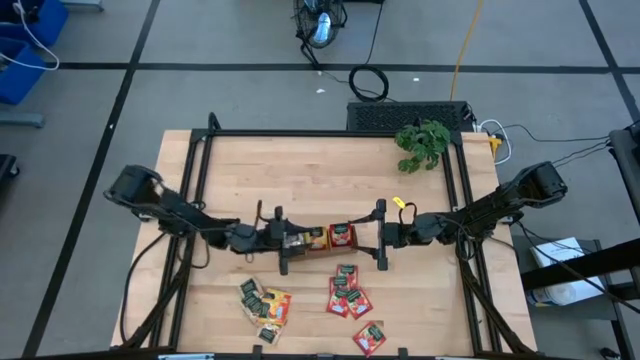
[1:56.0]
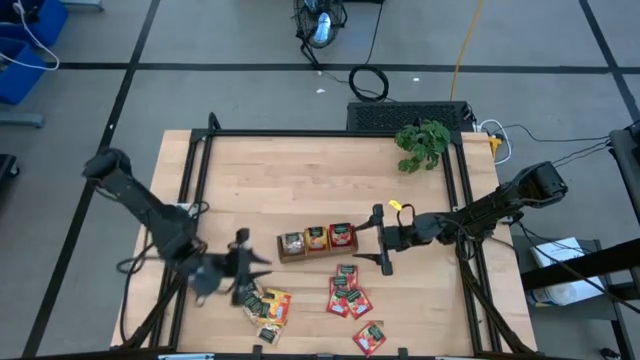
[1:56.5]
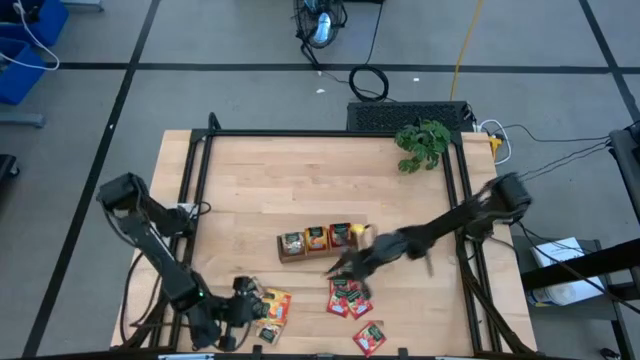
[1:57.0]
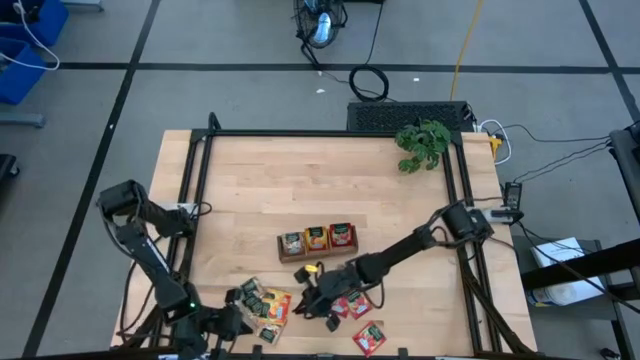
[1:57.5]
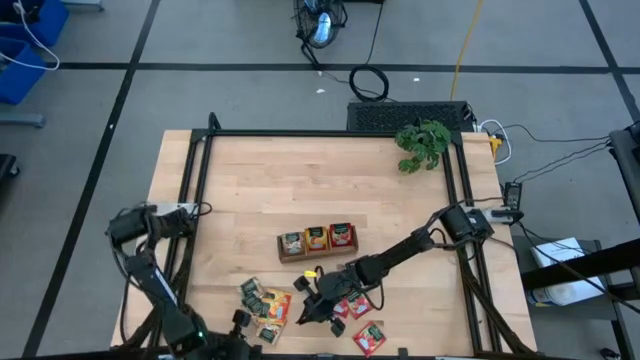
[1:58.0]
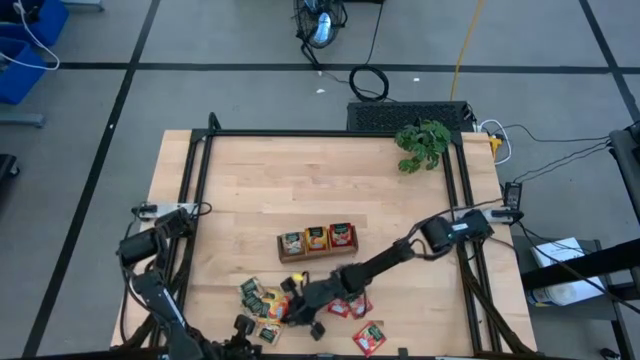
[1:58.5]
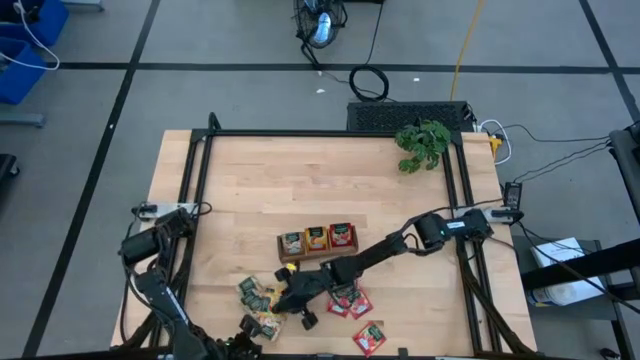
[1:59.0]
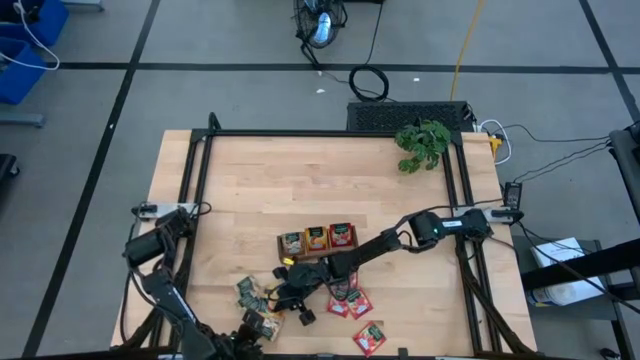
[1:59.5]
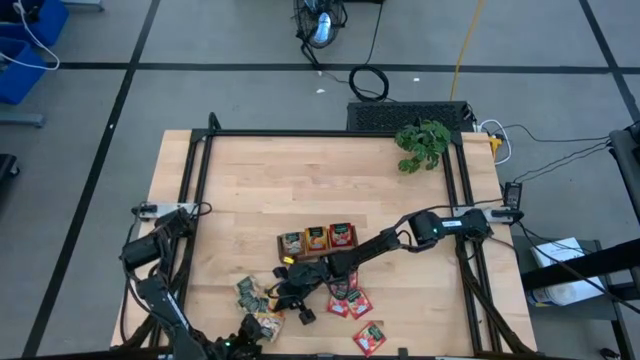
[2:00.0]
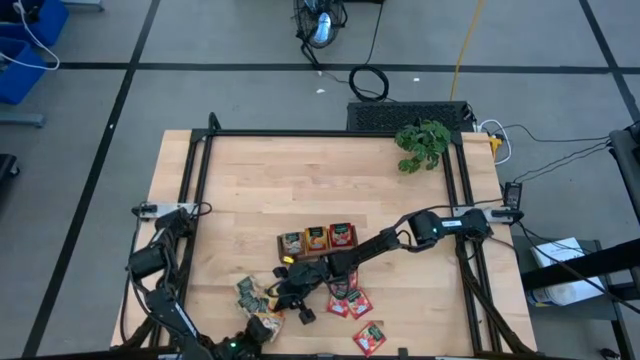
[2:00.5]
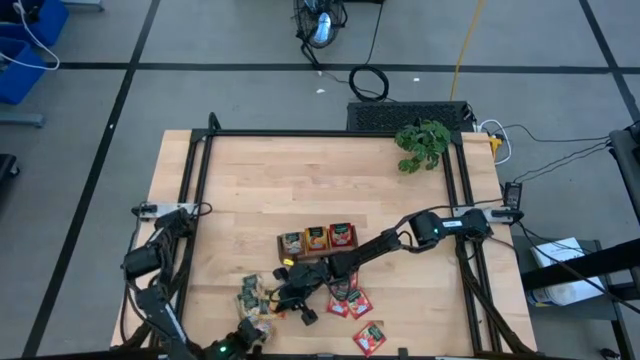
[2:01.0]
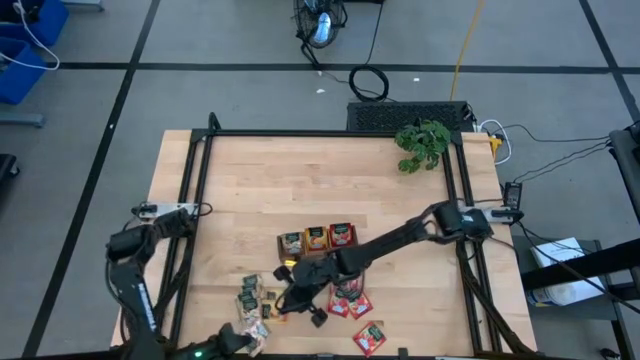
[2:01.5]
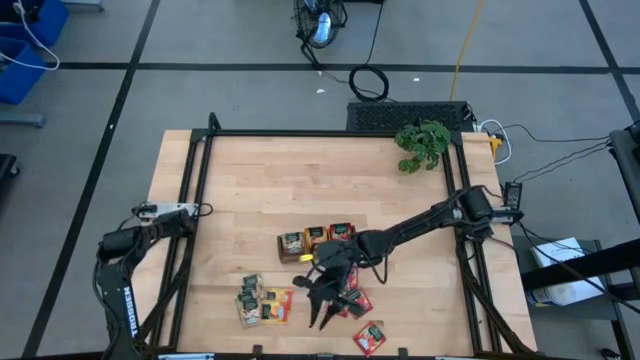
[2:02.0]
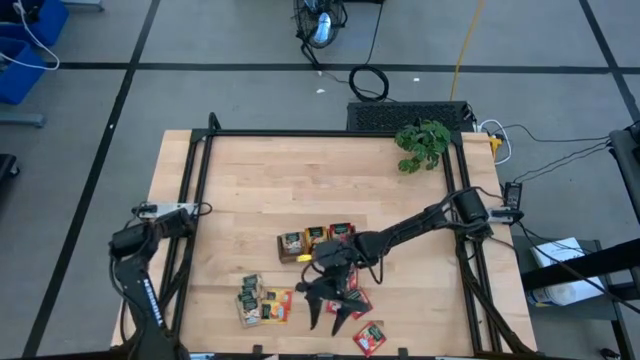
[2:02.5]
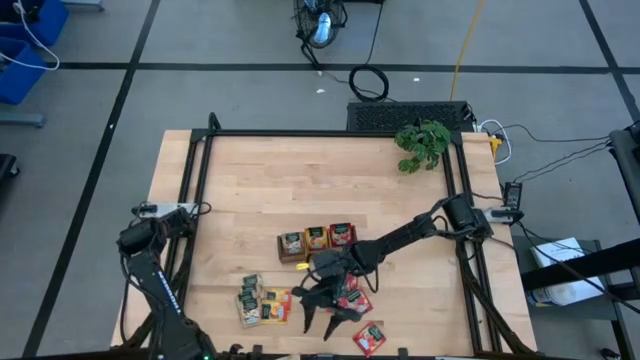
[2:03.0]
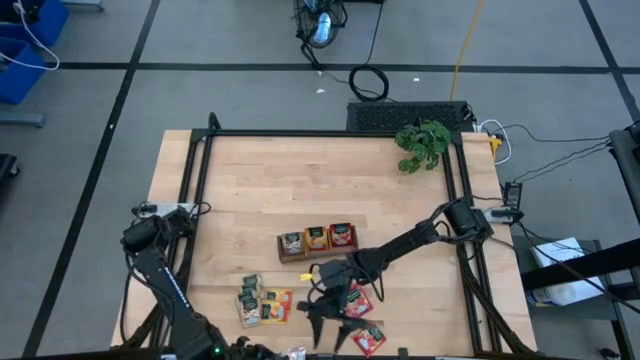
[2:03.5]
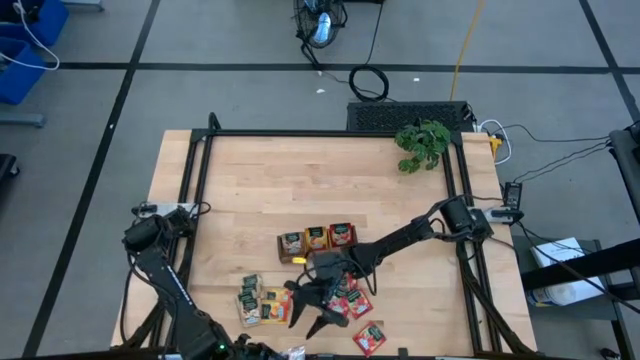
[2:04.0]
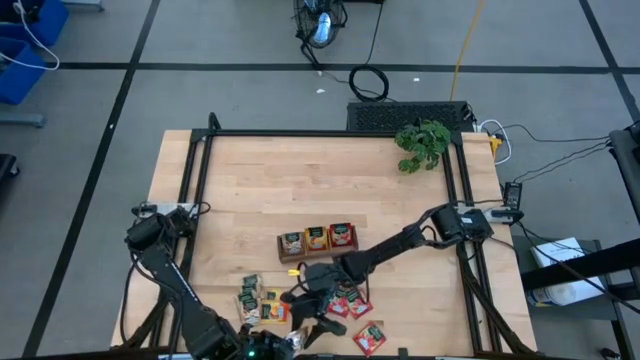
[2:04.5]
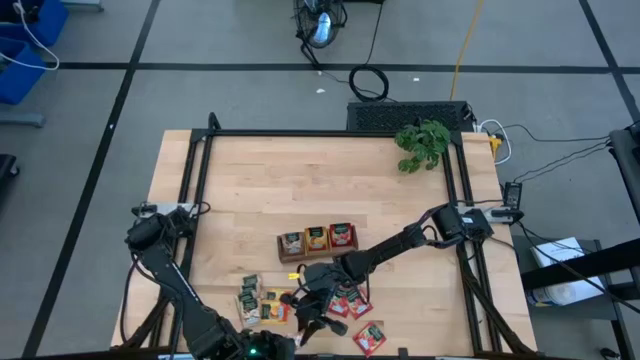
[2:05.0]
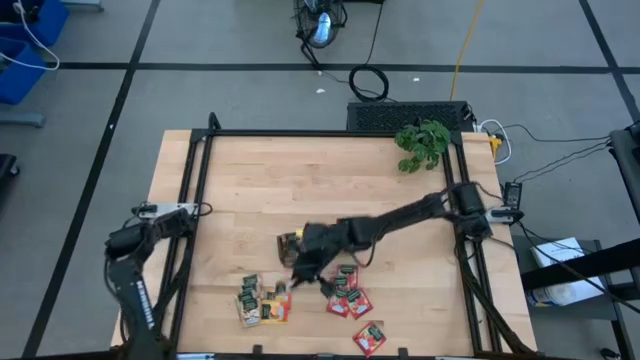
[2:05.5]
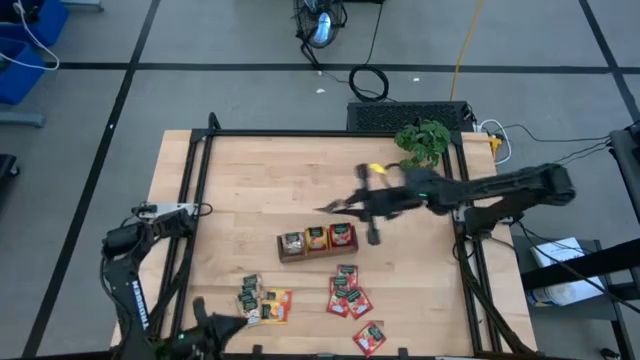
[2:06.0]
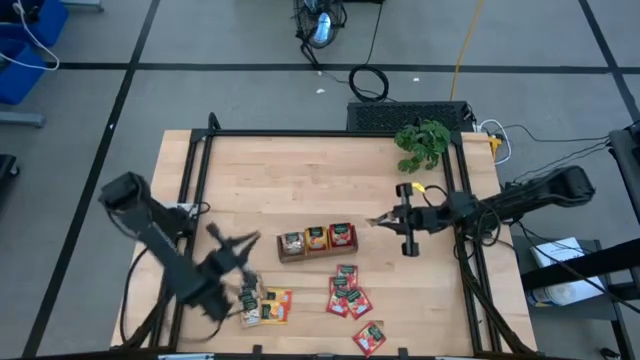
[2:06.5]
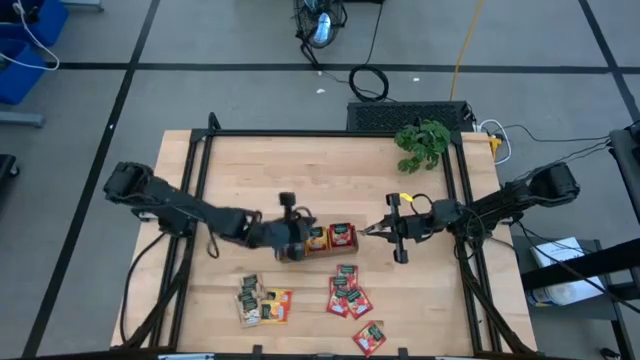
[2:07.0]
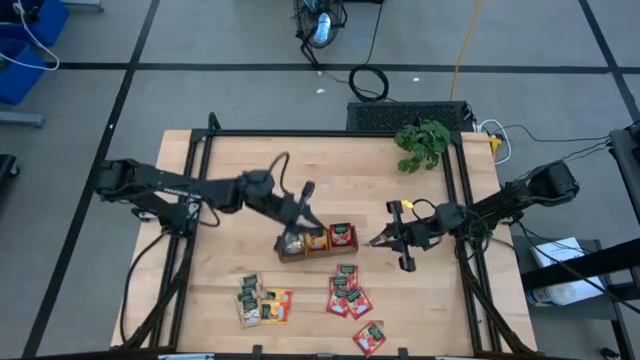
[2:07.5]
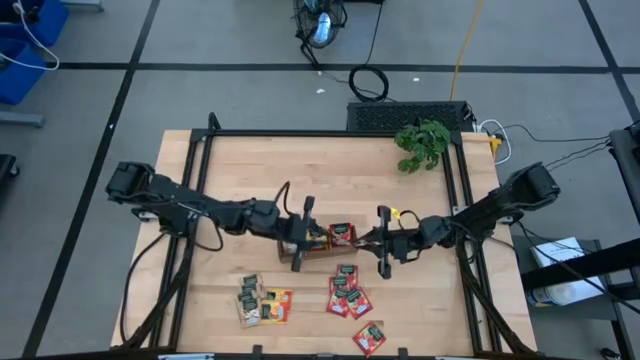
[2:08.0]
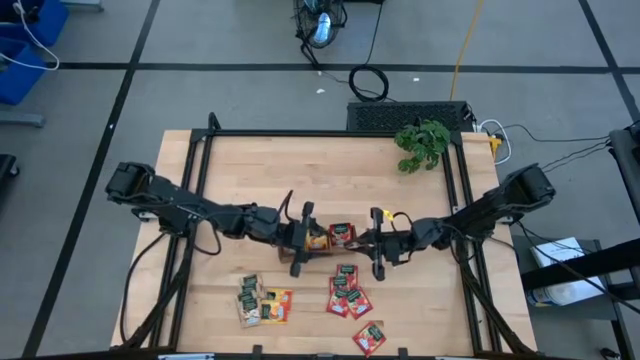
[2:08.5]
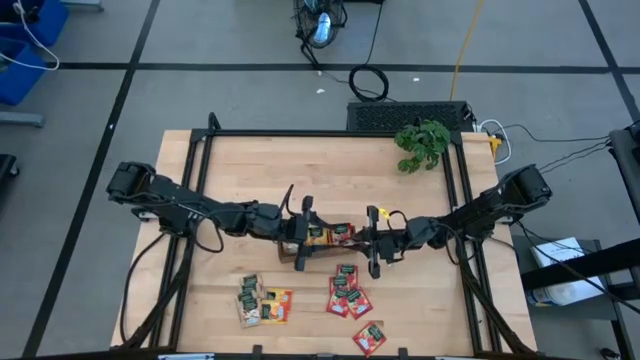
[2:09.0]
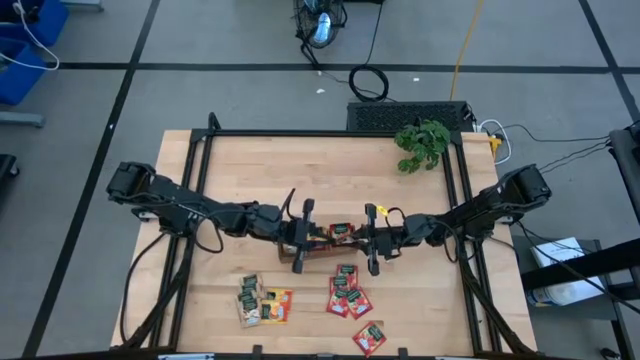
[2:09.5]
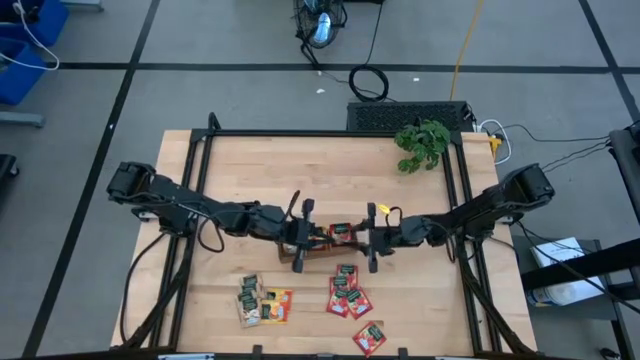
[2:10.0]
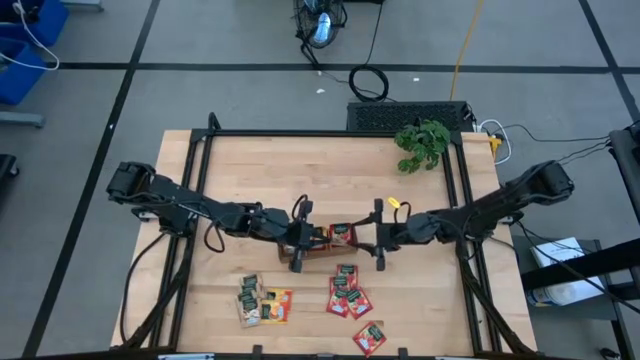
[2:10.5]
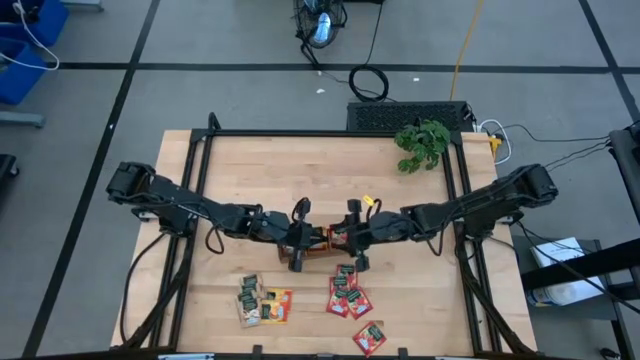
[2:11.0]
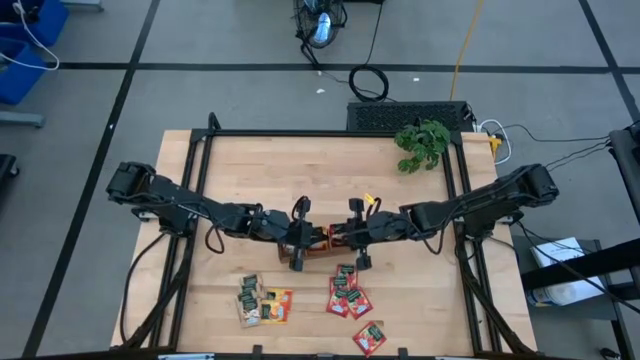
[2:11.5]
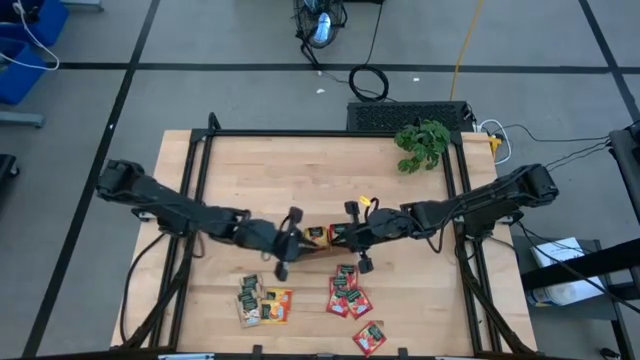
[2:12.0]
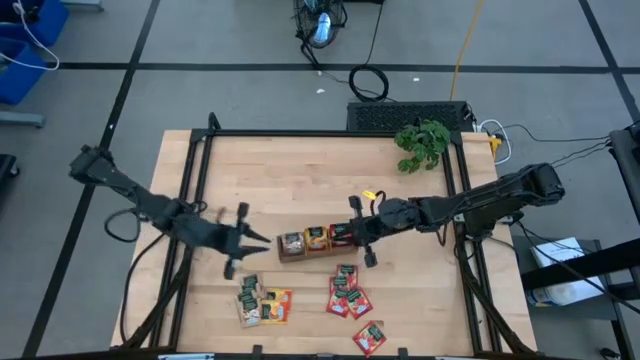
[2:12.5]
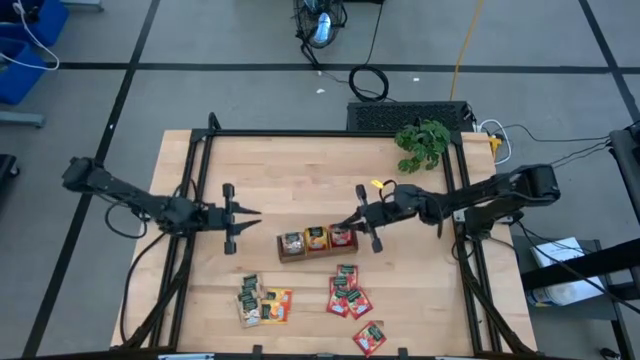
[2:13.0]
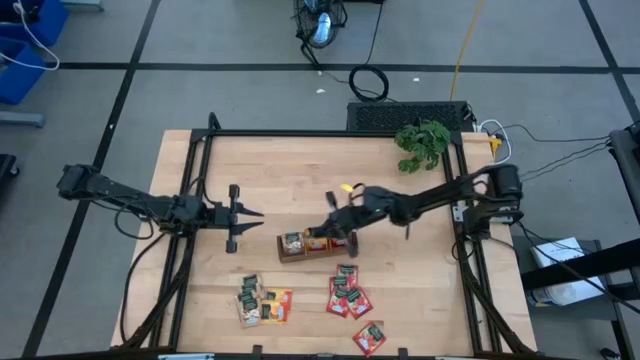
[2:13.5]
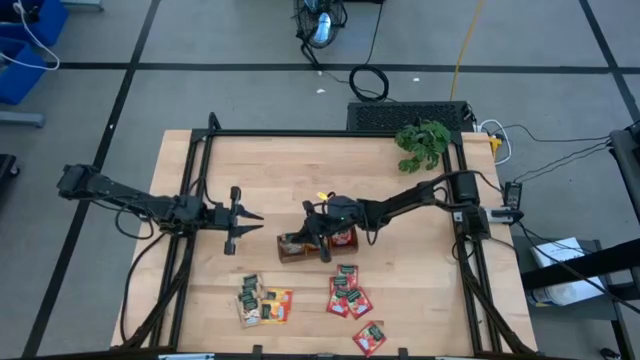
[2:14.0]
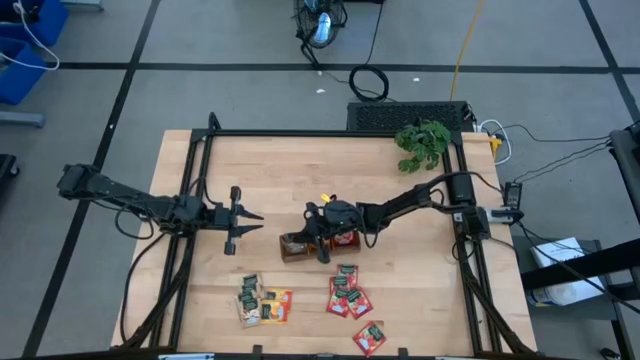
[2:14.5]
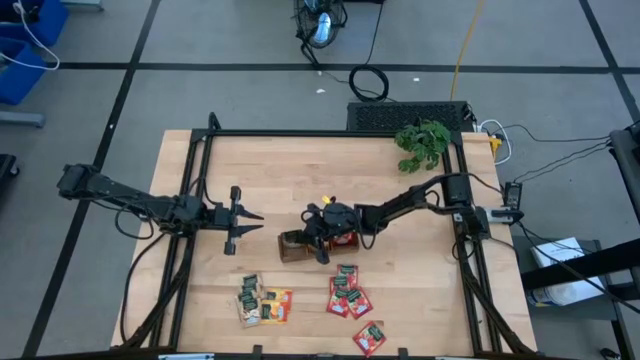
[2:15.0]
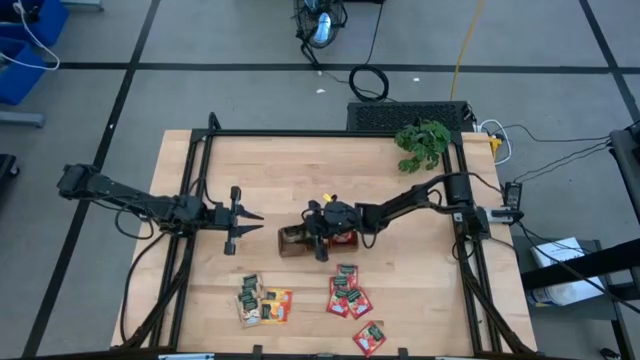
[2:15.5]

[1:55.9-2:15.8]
Task: Pick & Place Tea
Put the brown tea bag into the left section of the wooden organizer

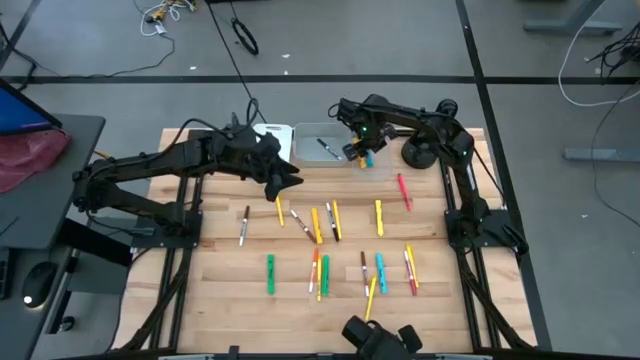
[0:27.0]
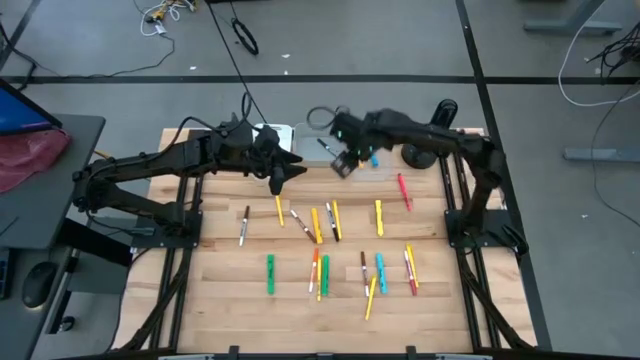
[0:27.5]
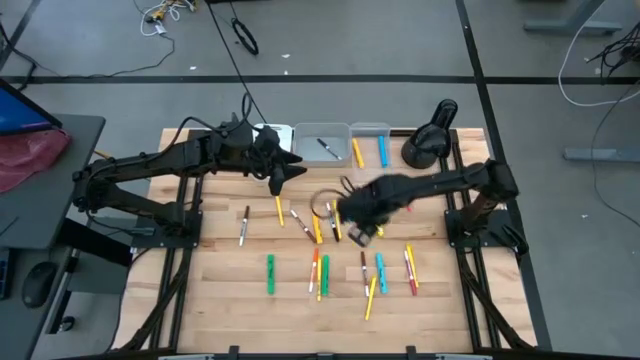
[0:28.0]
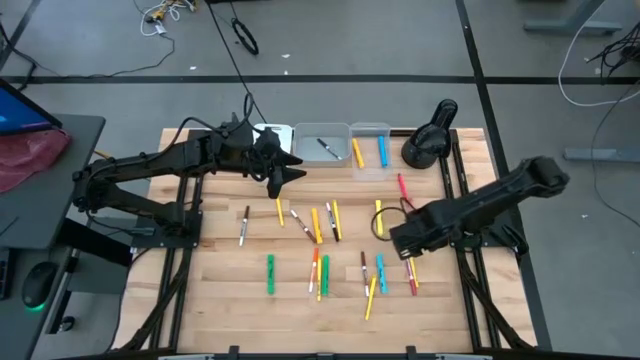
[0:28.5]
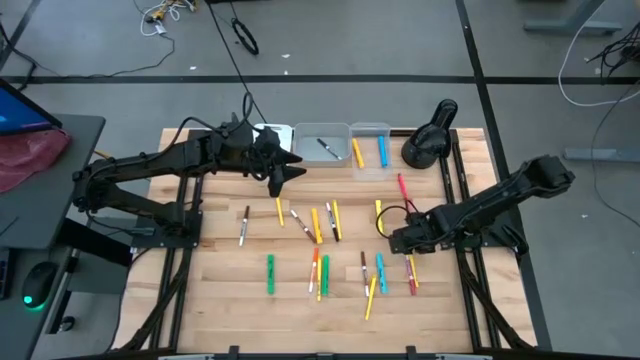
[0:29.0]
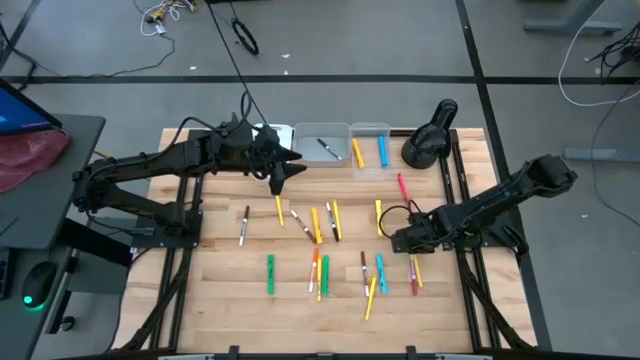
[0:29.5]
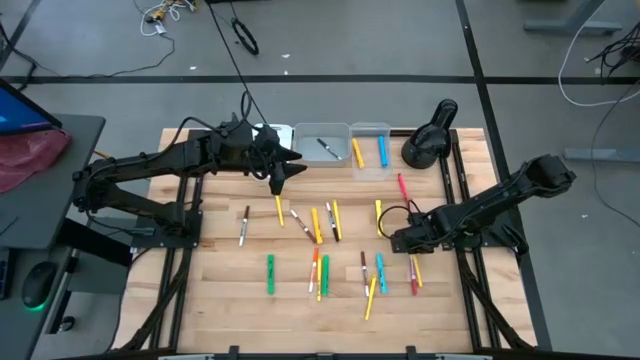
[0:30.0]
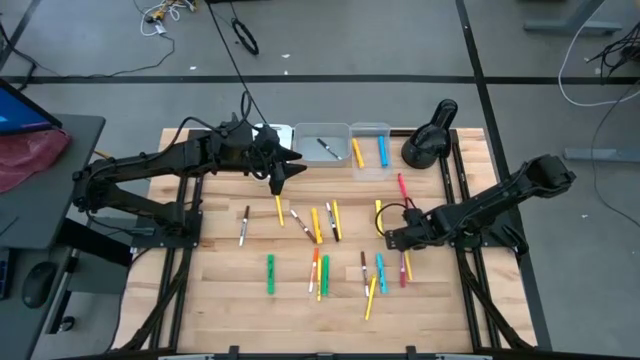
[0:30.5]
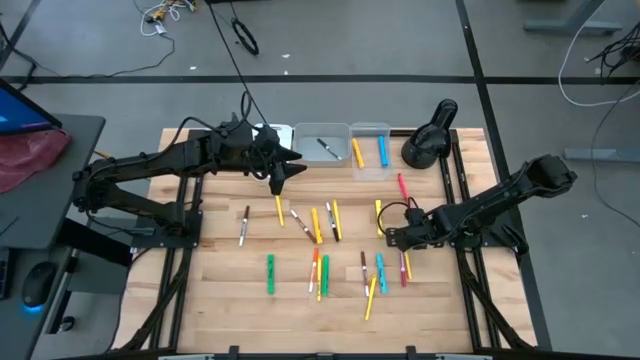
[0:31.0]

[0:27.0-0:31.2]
Task: Pick & Place Markers
Put the yellow pen into the white bin
